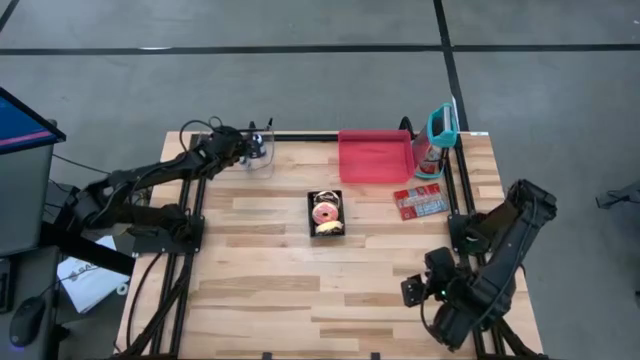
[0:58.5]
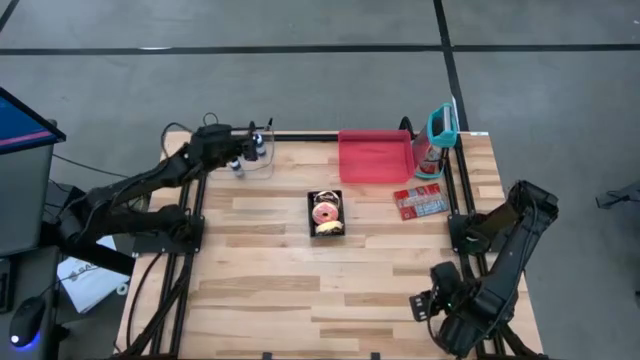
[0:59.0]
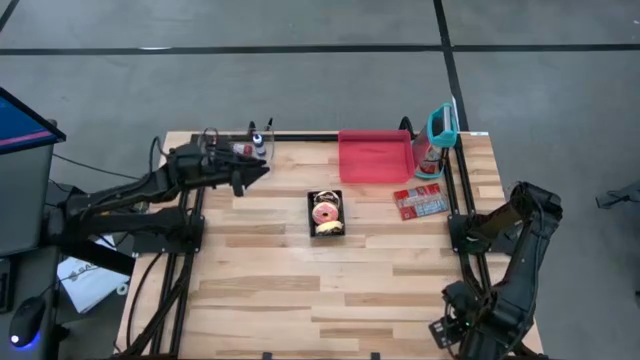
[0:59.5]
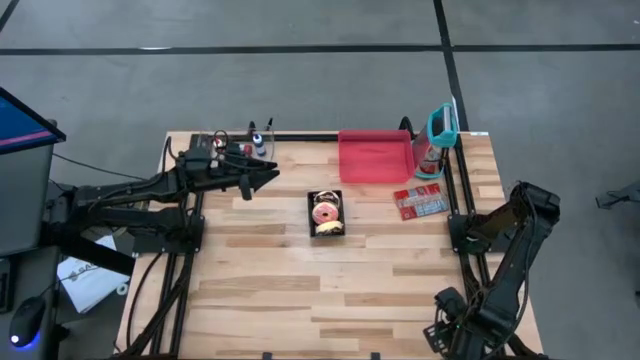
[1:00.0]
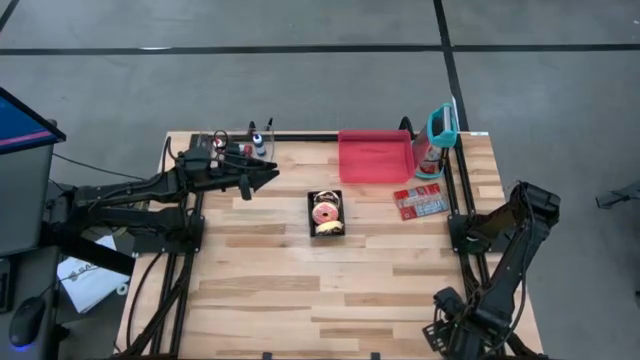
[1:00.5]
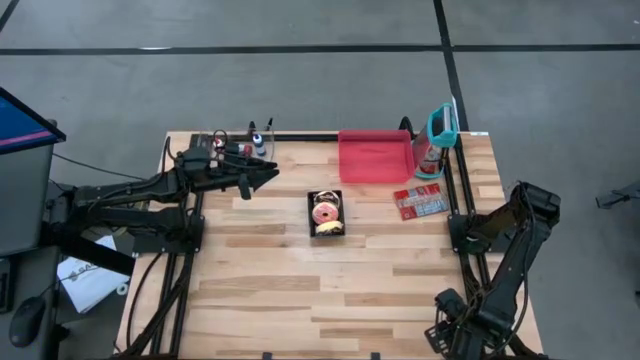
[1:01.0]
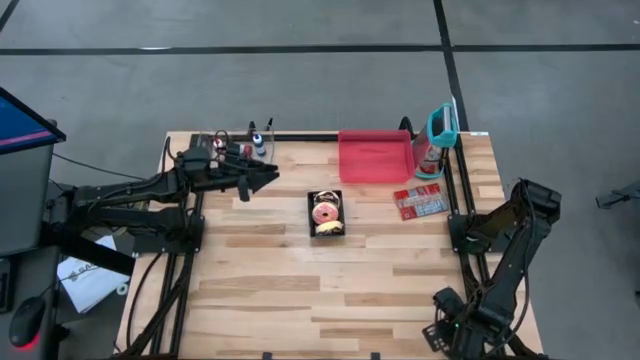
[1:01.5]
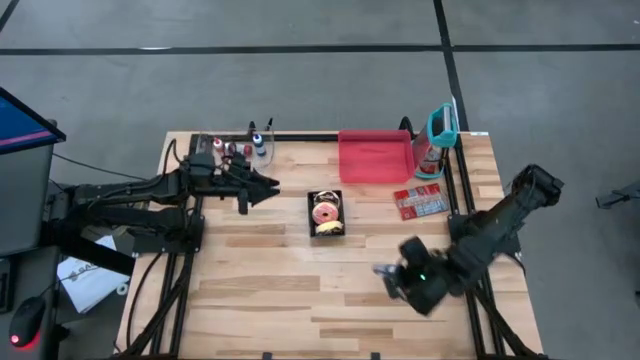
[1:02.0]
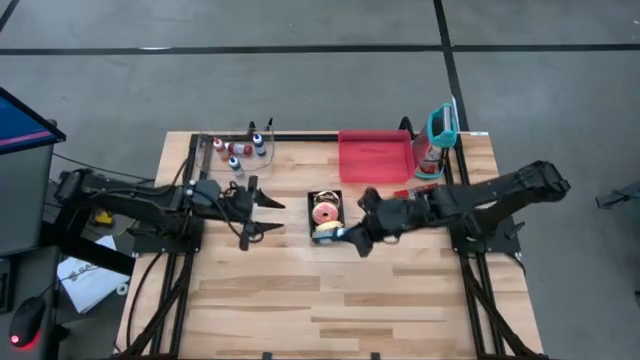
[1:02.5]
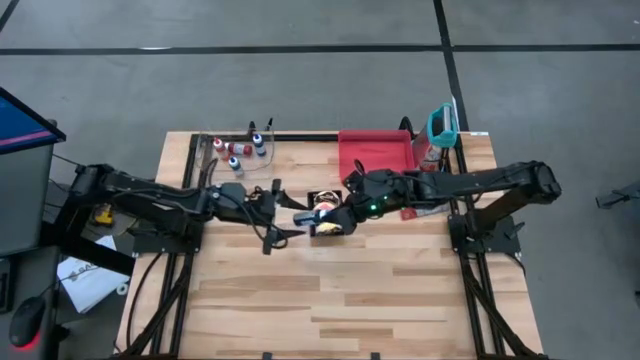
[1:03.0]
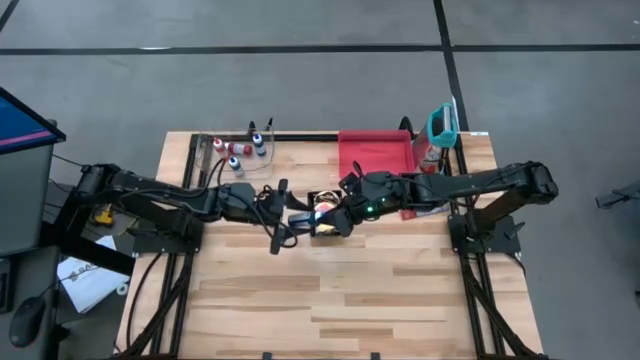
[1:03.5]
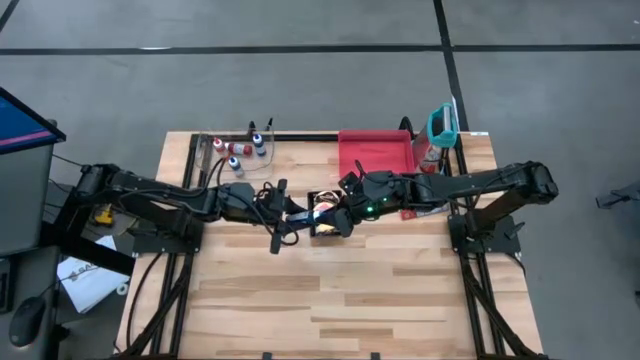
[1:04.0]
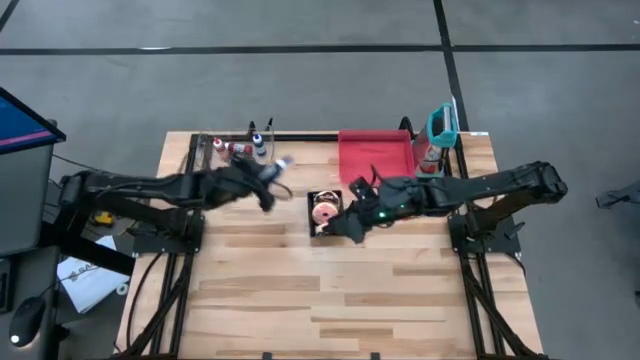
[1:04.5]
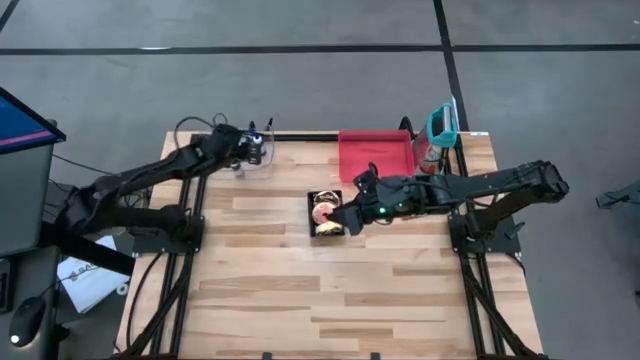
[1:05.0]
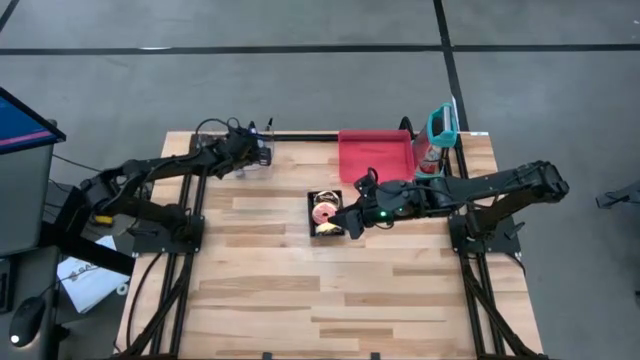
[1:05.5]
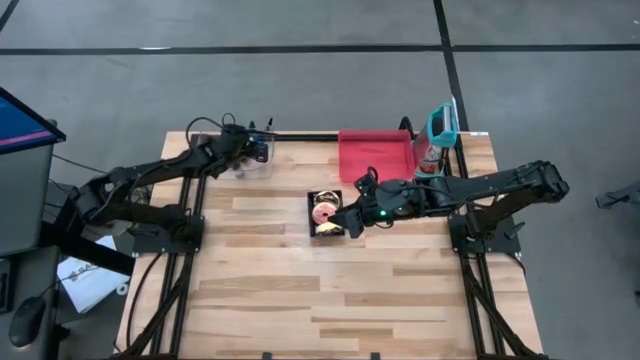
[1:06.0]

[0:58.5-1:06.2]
Put the blue food coloring bottle into the transparent bin

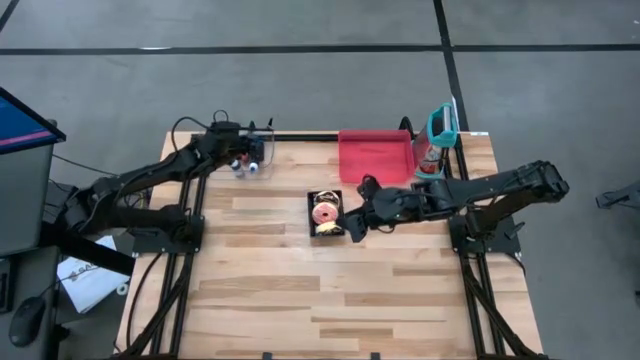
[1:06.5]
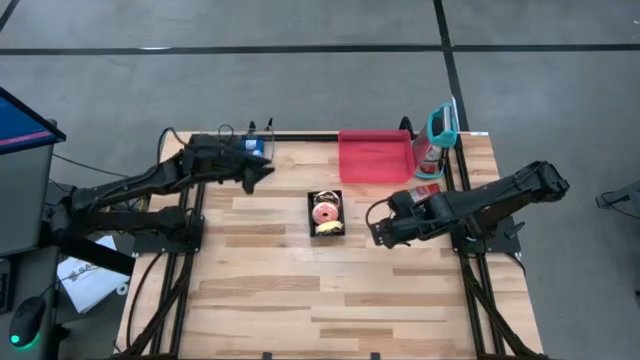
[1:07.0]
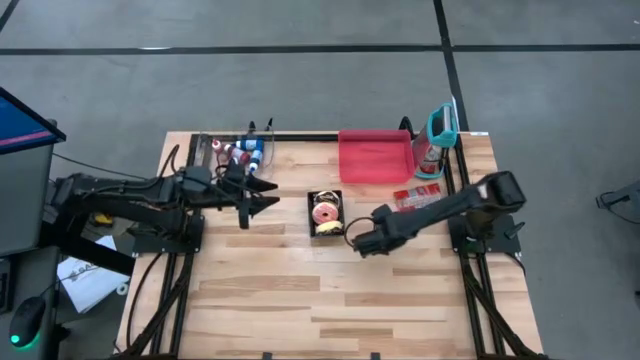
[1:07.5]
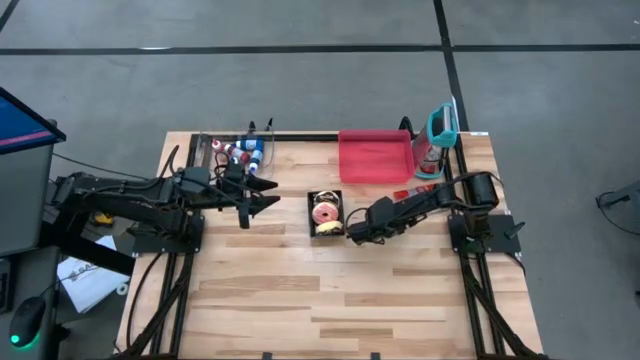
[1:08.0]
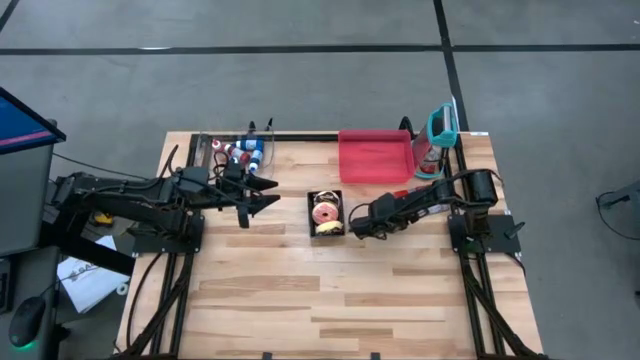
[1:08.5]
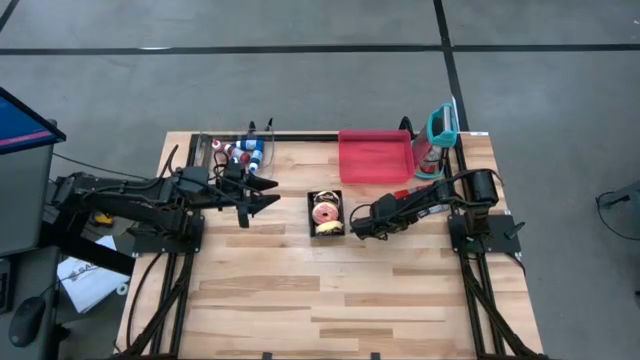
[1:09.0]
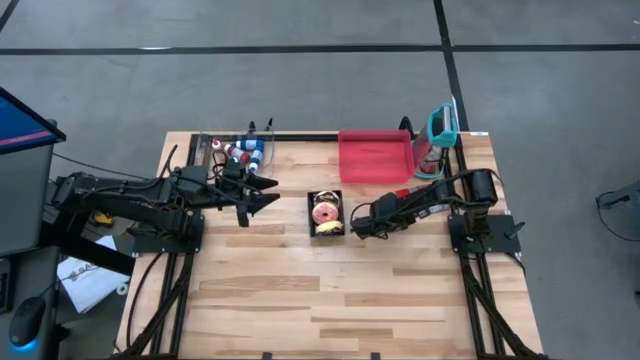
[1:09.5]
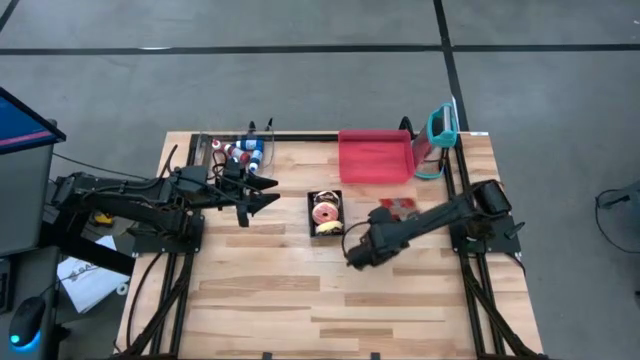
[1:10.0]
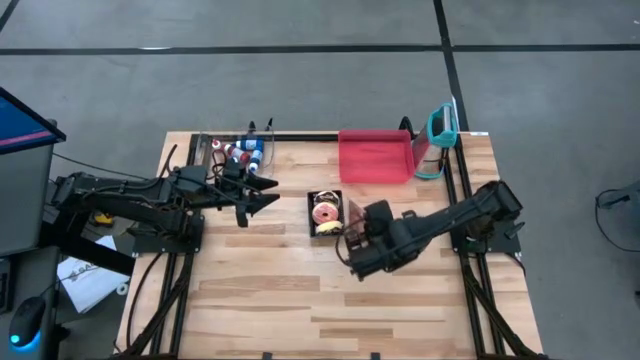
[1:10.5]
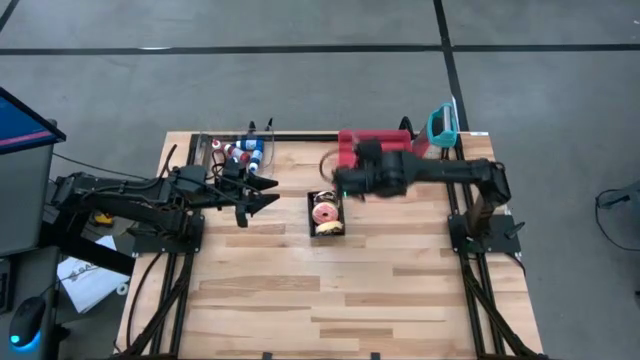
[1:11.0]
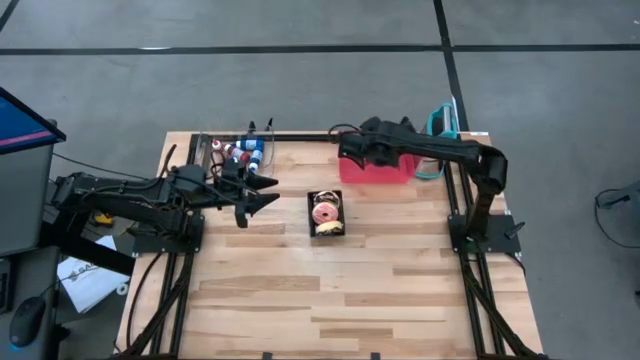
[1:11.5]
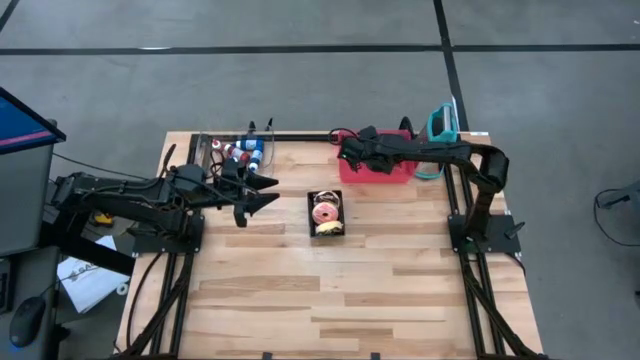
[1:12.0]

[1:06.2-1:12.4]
Put the orange popcorn bag into the red bin

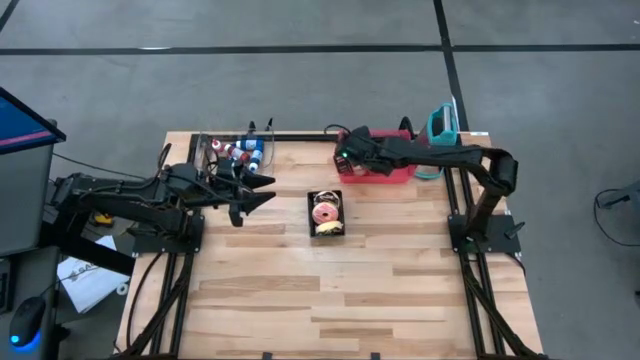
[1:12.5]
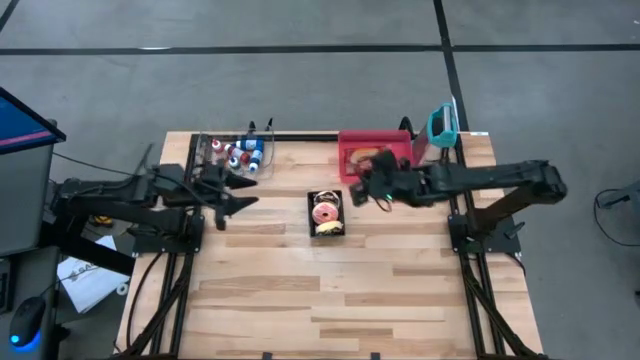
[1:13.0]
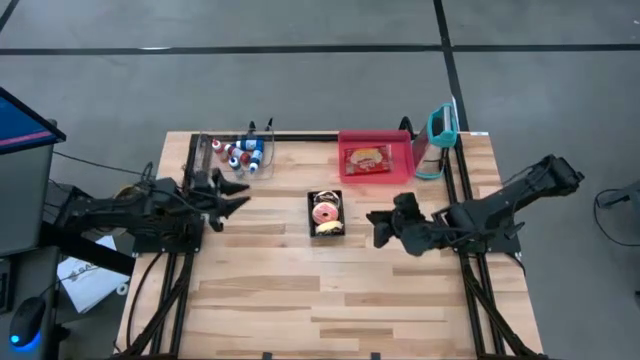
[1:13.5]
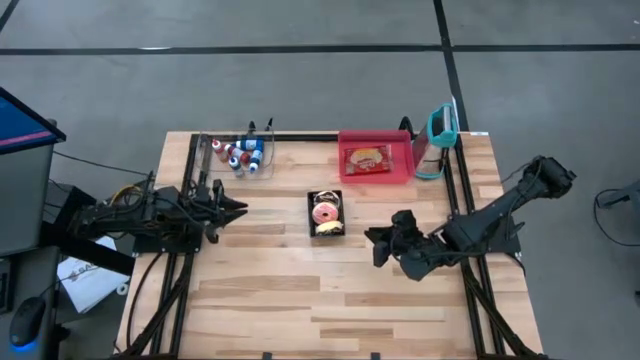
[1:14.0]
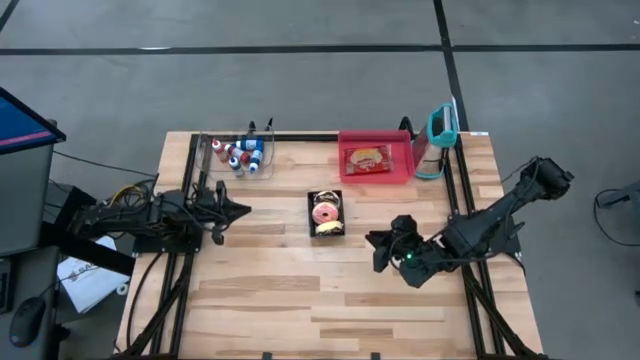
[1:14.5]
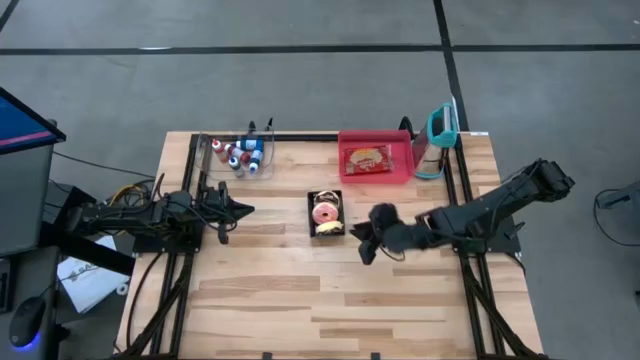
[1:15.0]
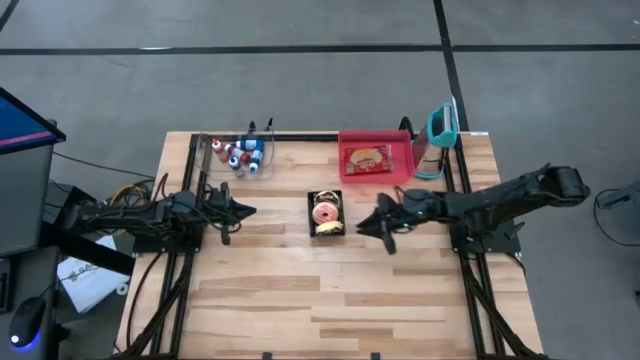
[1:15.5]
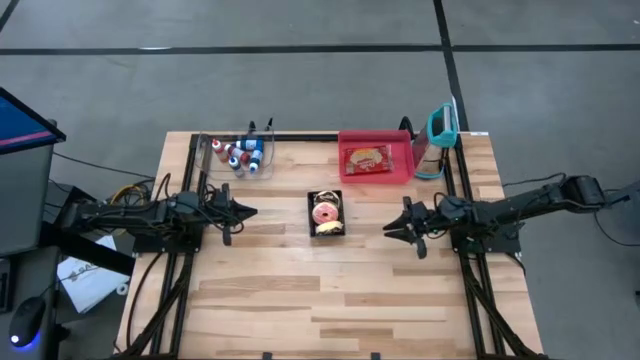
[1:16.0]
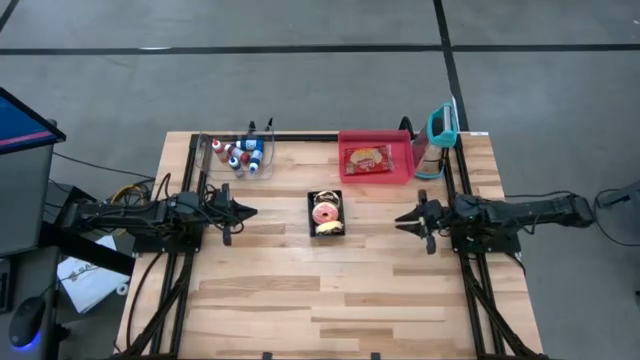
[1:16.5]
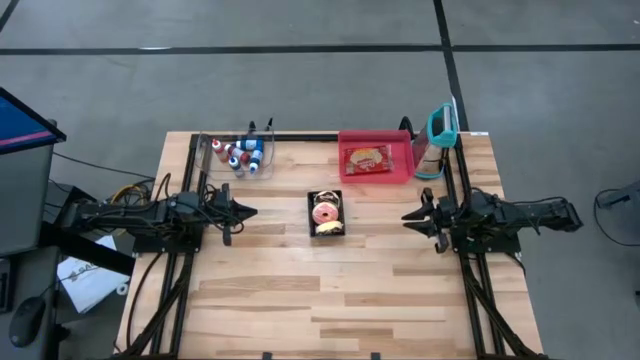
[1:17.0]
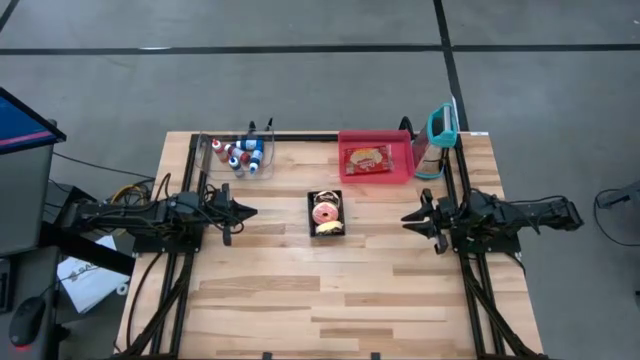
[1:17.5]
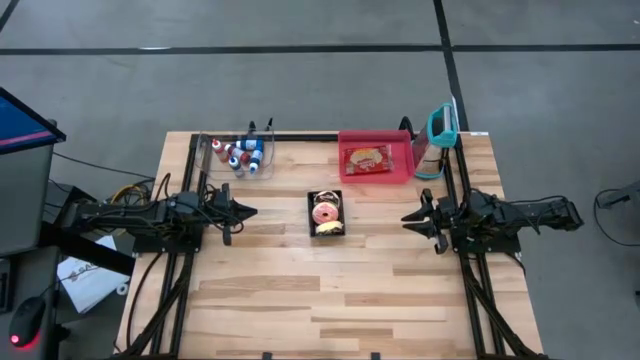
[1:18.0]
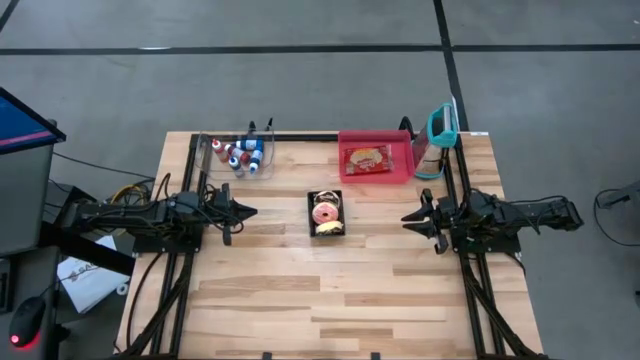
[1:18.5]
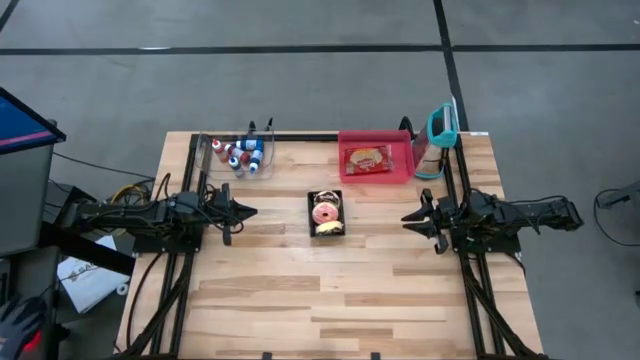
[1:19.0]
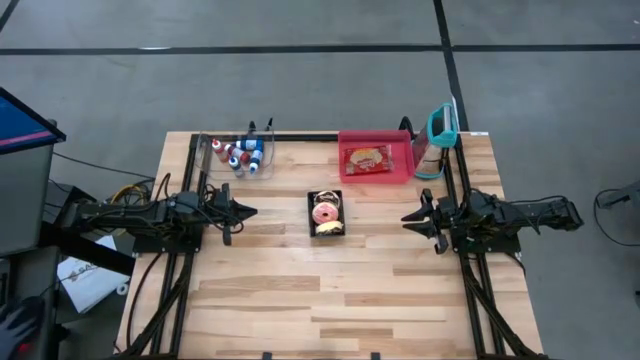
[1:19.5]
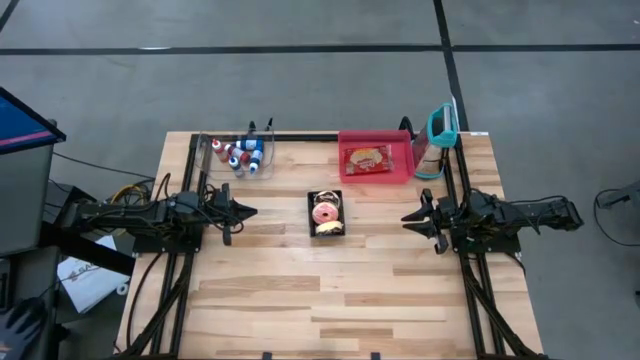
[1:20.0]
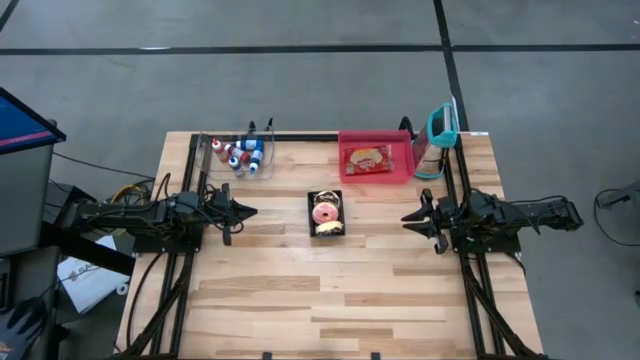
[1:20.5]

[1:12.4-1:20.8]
Return to Home Position
